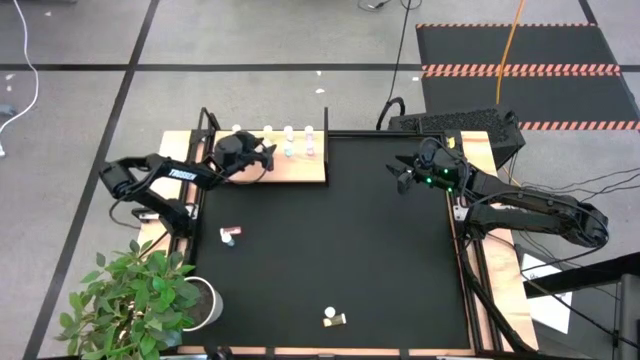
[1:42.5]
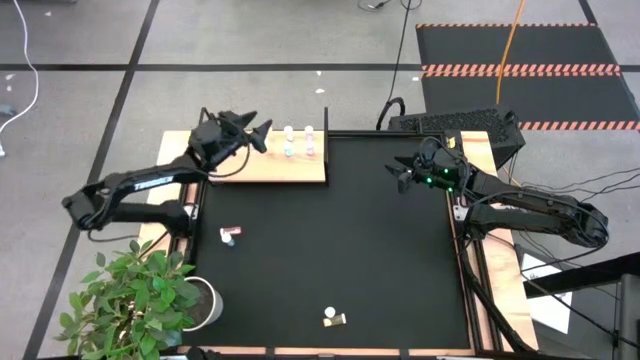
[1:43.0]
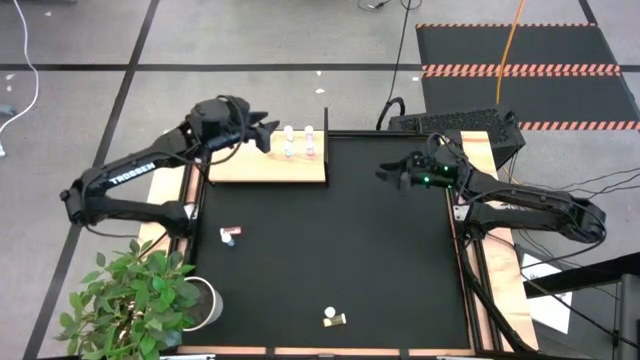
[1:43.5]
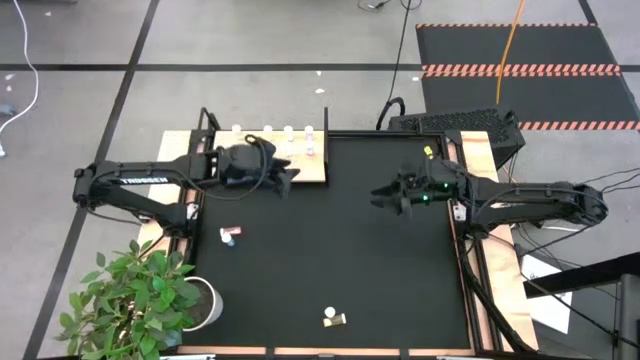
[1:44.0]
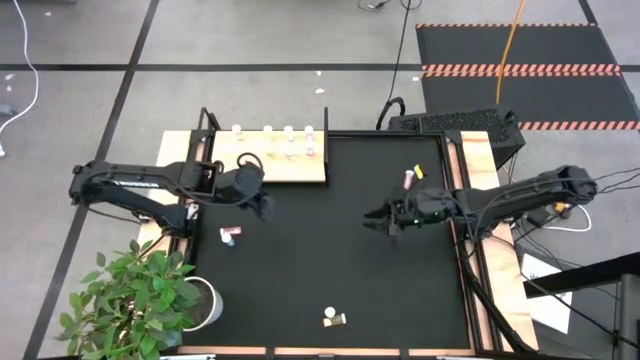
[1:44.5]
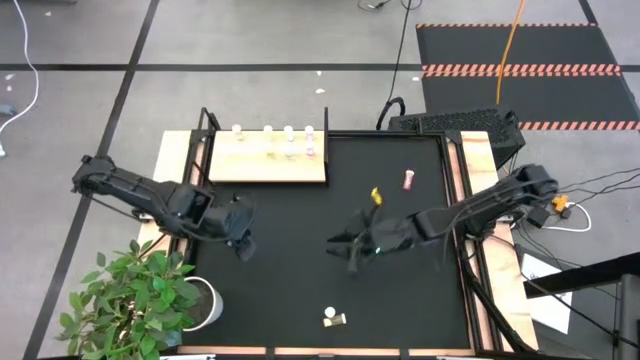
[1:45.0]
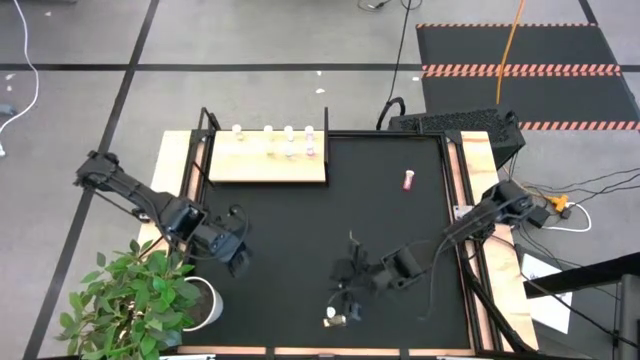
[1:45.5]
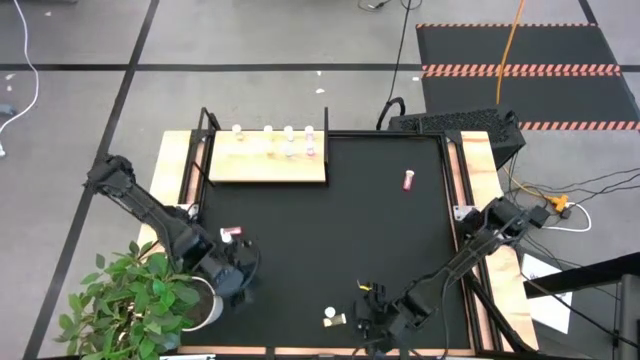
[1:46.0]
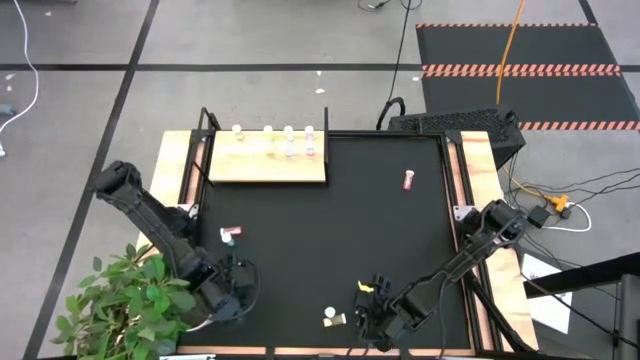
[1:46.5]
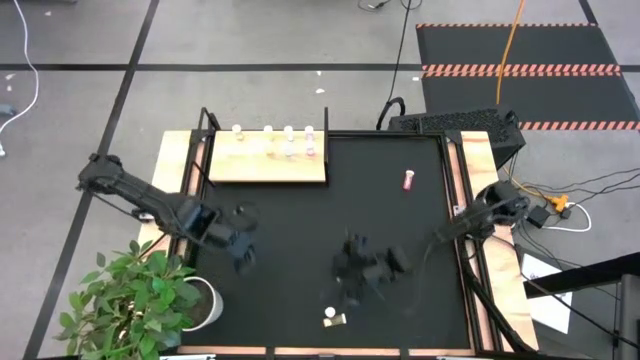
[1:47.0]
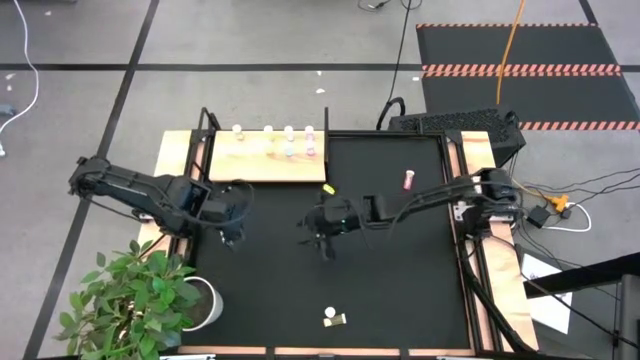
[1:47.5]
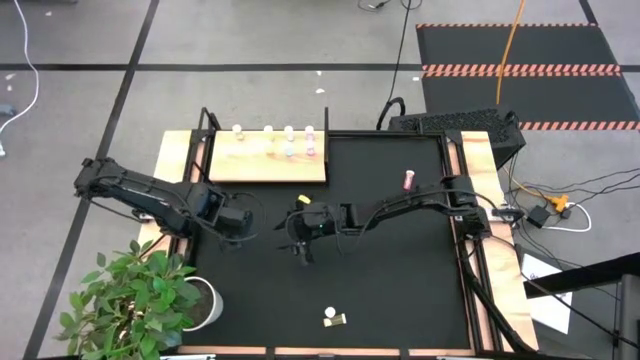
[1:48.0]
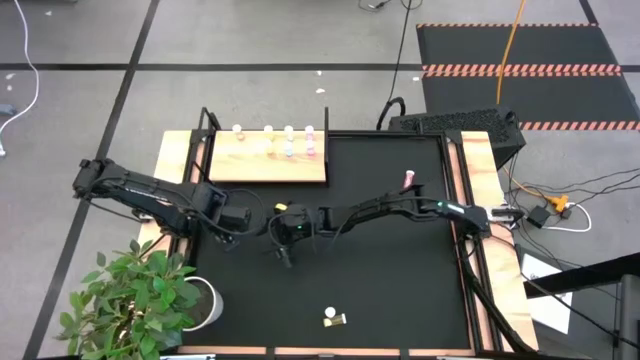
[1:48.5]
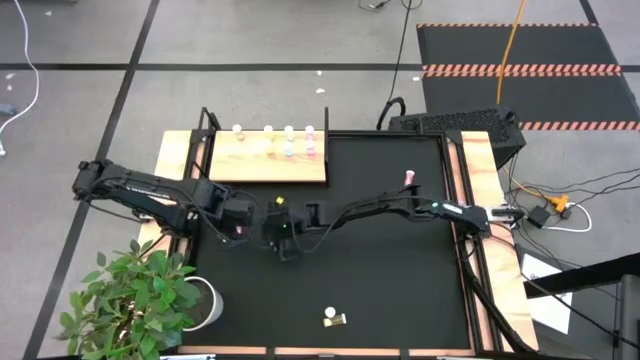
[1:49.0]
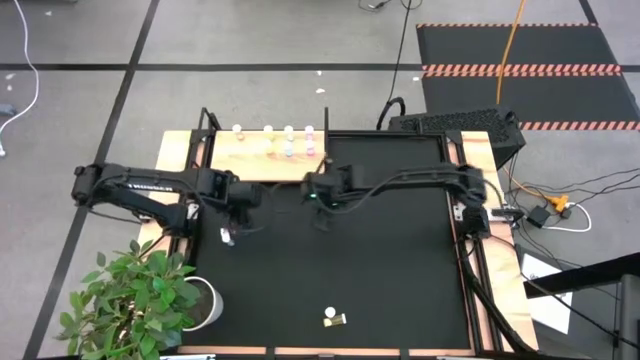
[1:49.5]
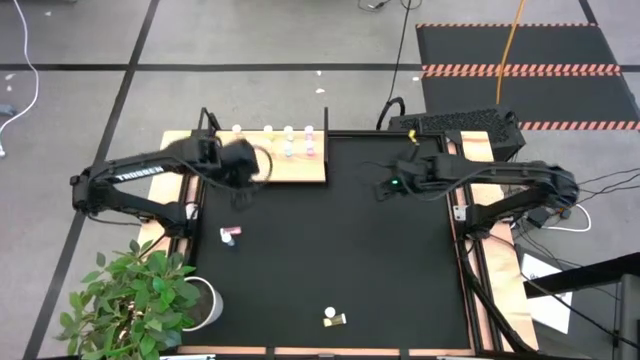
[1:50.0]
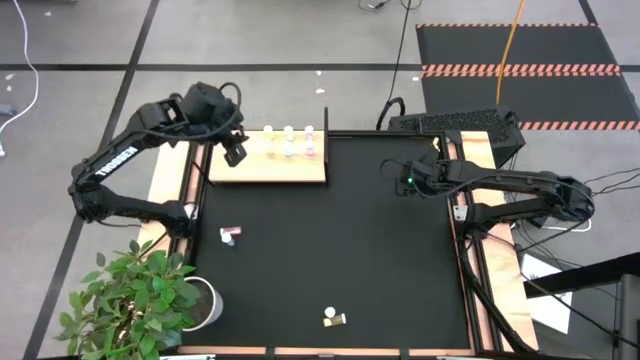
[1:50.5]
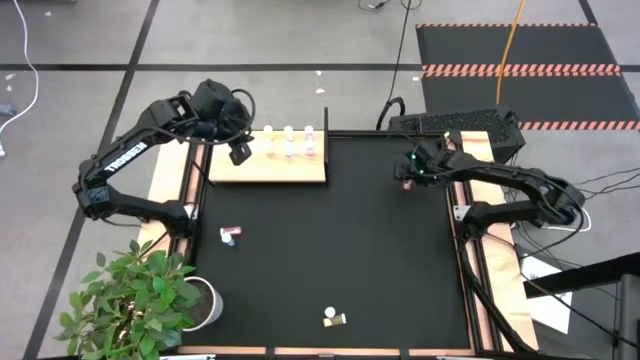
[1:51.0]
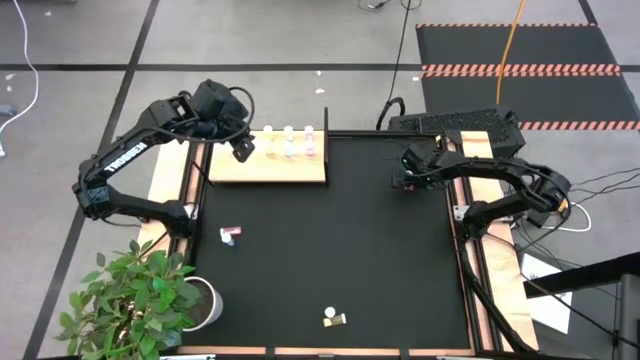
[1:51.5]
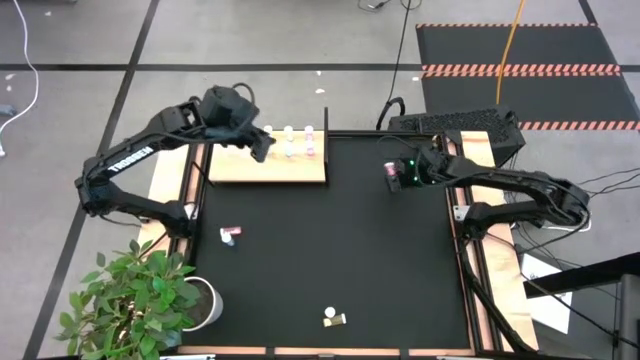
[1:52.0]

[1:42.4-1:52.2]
Task: Pick and place medicine bottles onto shelf by color
Put the top pink pill bottle on the shelf aligned with the other pink pill bottle

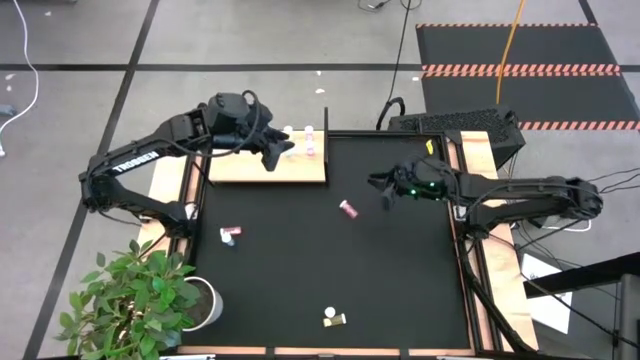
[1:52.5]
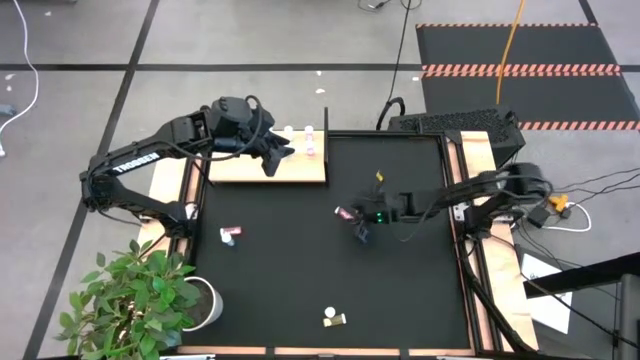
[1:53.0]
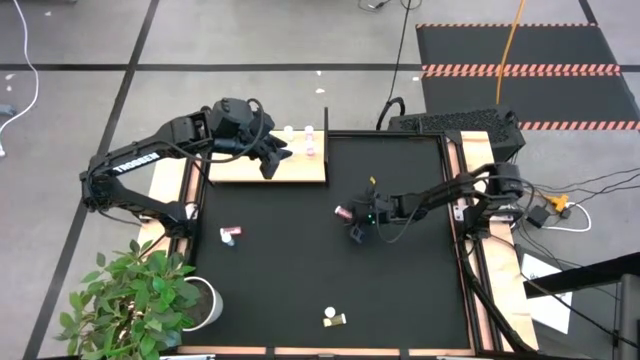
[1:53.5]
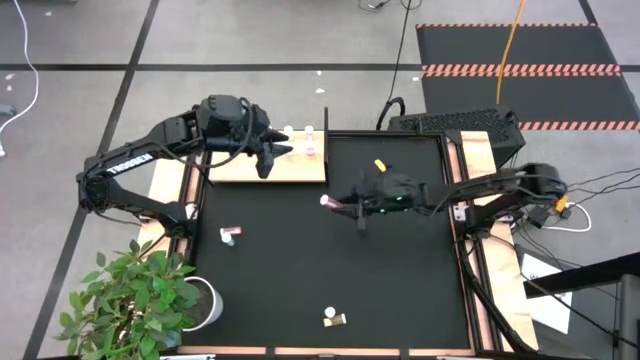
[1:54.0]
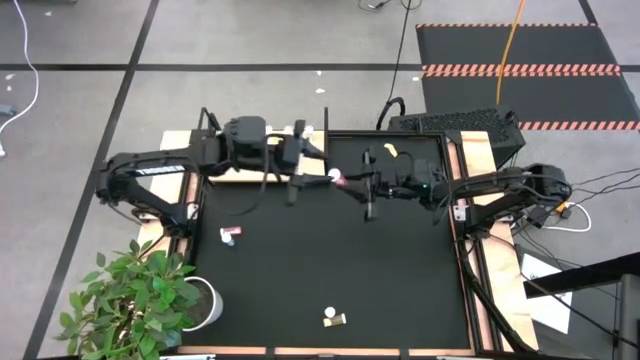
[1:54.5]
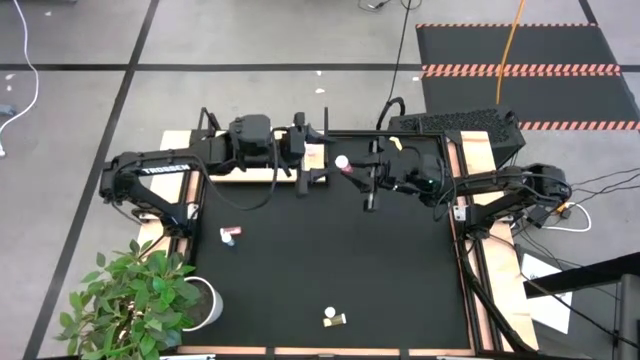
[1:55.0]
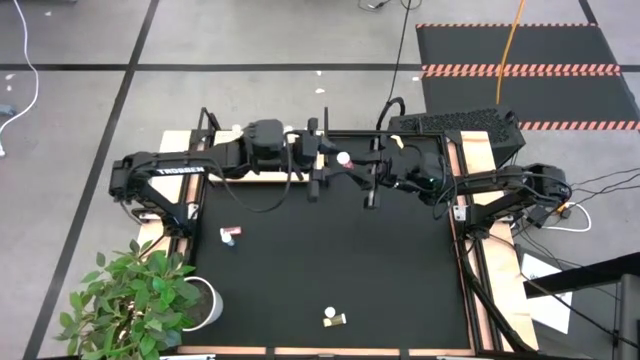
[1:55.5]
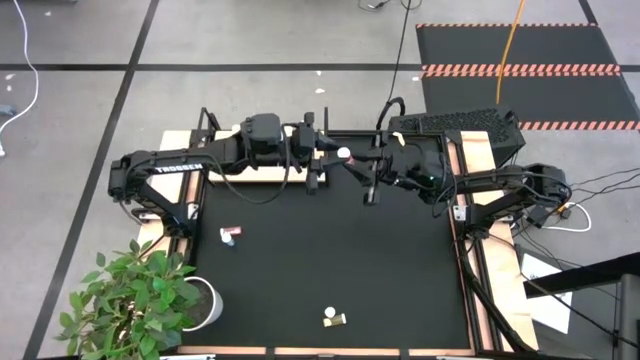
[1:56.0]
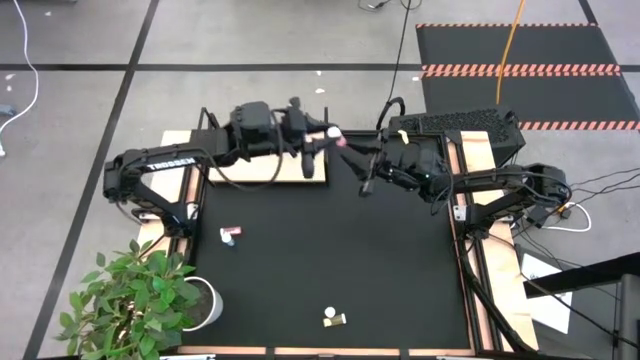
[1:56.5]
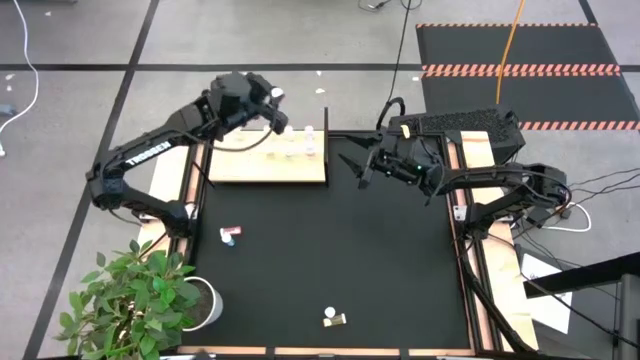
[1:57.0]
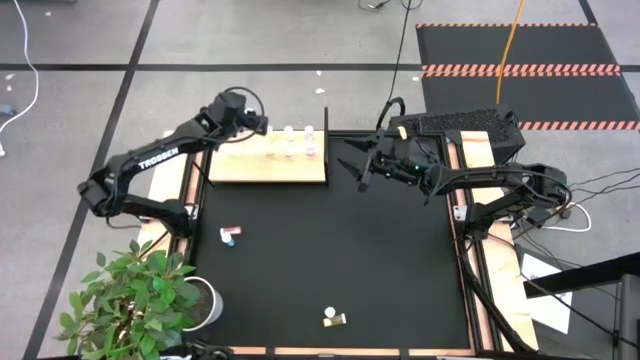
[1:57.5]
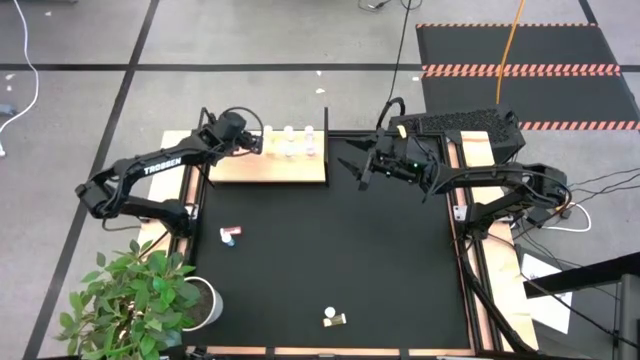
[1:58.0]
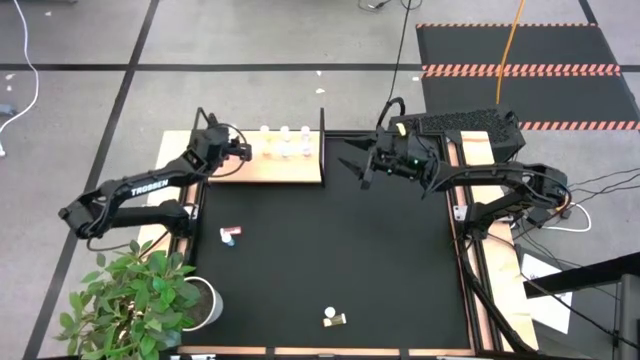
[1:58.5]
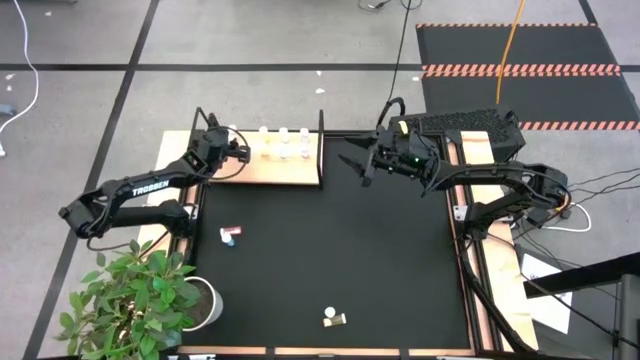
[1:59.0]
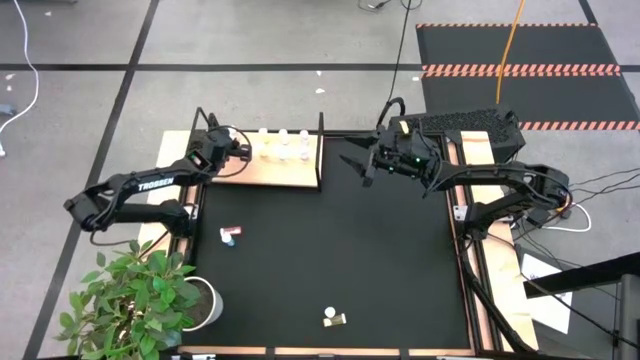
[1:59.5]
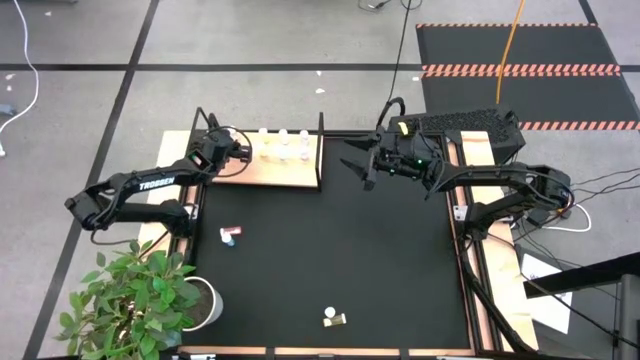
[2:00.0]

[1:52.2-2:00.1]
Put the top pink pill bottle on the shelf aligned with the other pink pill bottle

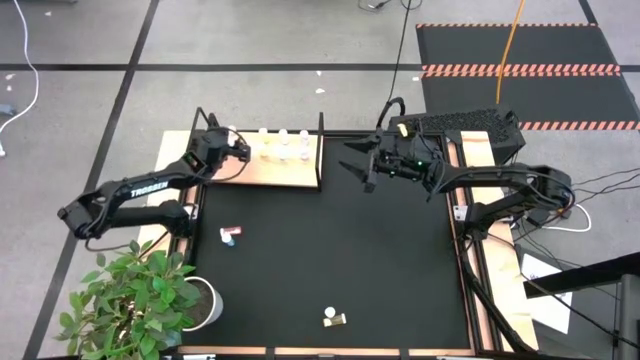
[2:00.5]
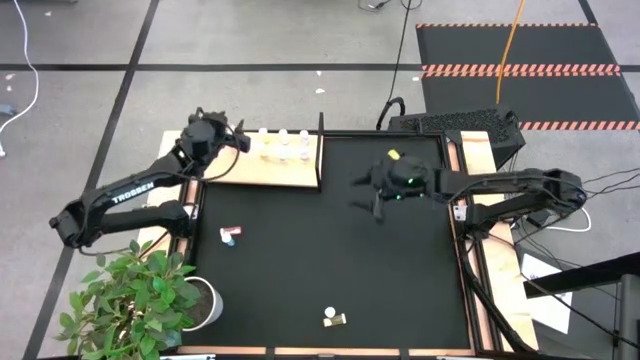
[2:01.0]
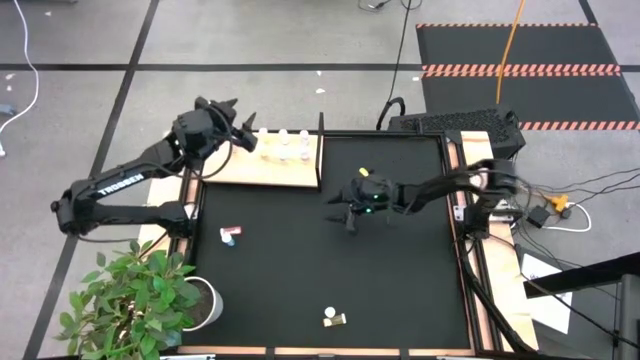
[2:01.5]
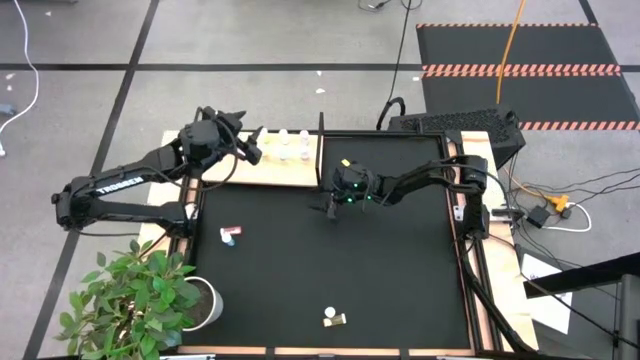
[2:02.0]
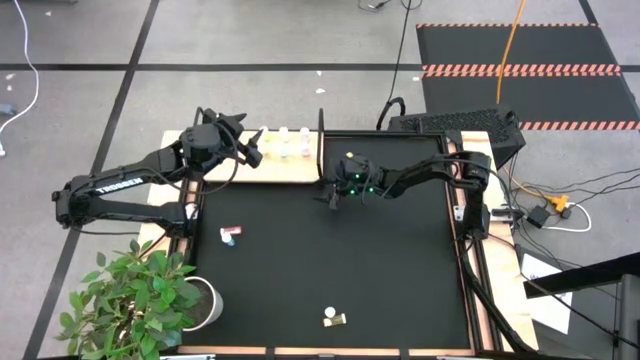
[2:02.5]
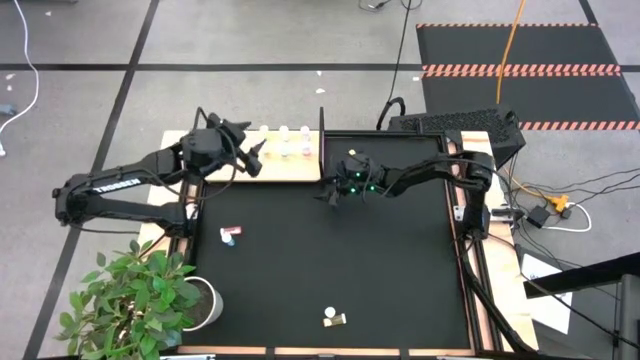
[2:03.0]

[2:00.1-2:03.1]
Adjust the shelf on the table

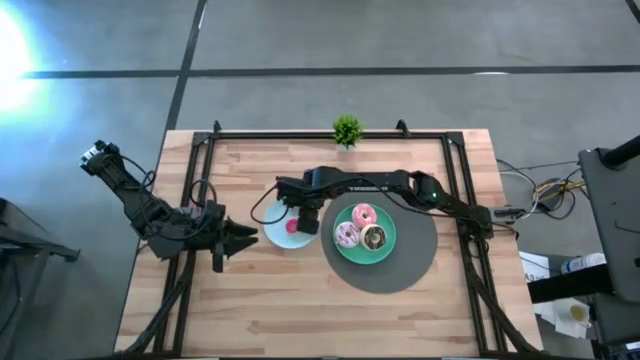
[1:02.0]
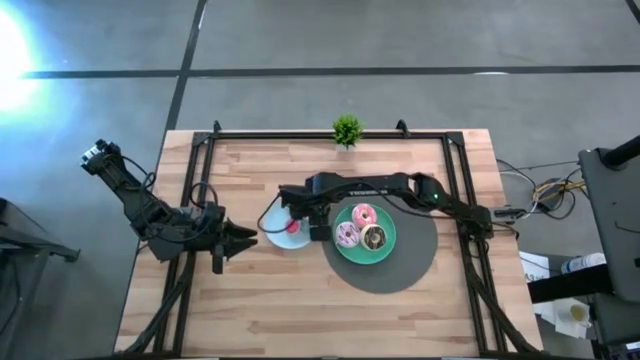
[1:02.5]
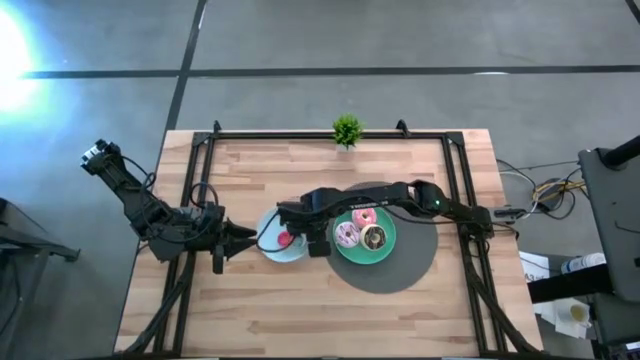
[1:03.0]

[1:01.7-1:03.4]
Task: Pick & Place donuts
Adjust the small yellow donut on the light blue plate to align the position
